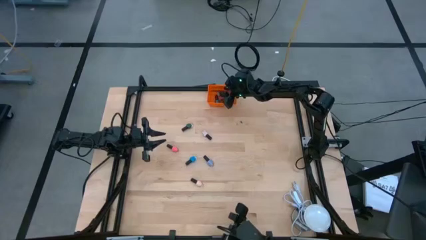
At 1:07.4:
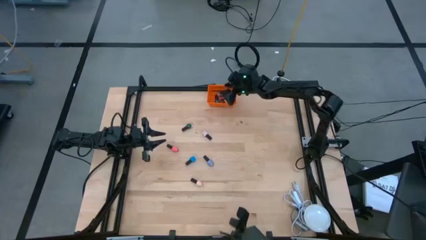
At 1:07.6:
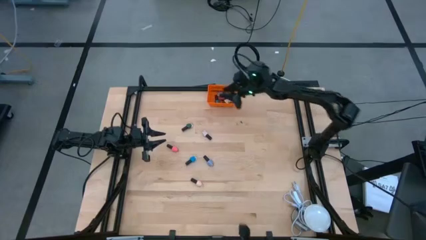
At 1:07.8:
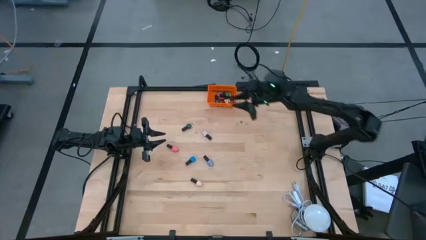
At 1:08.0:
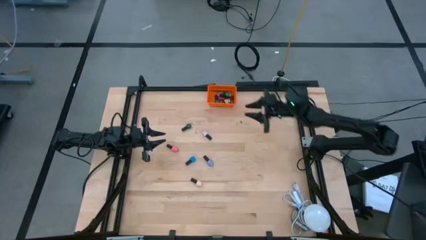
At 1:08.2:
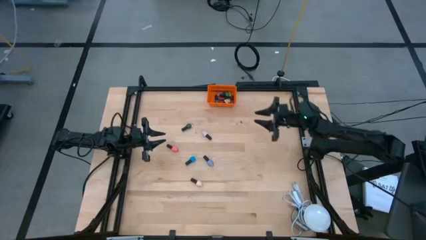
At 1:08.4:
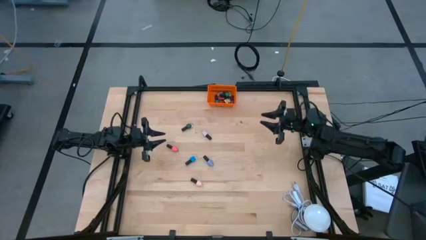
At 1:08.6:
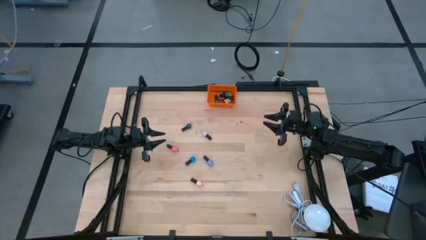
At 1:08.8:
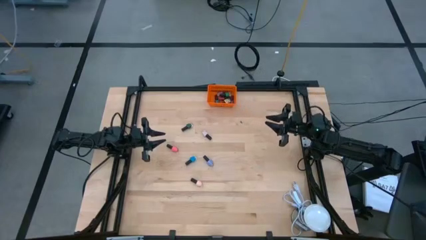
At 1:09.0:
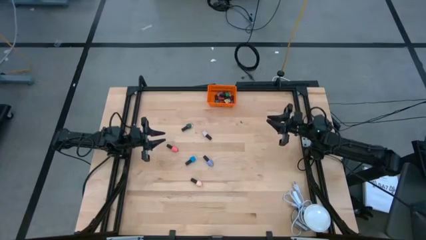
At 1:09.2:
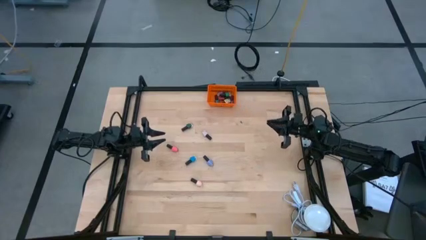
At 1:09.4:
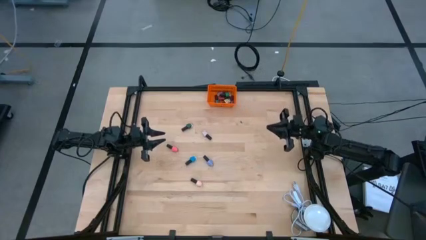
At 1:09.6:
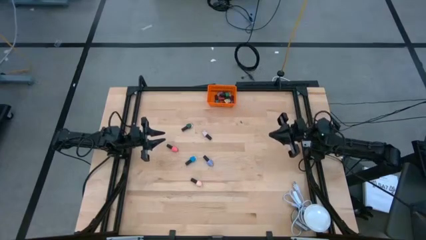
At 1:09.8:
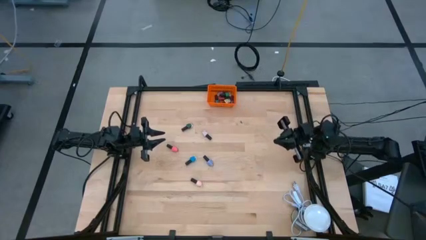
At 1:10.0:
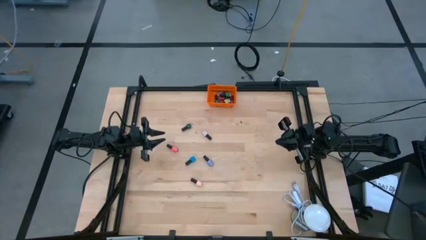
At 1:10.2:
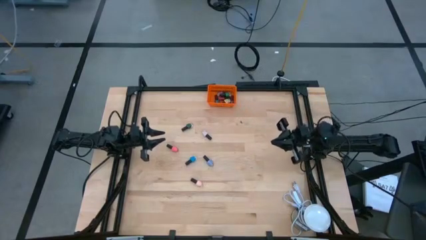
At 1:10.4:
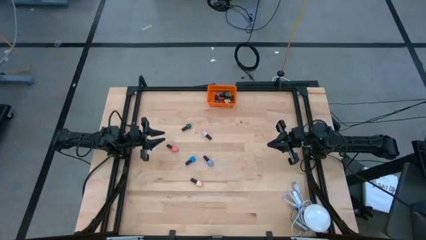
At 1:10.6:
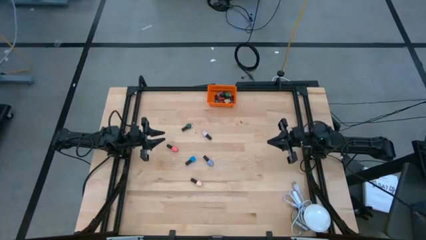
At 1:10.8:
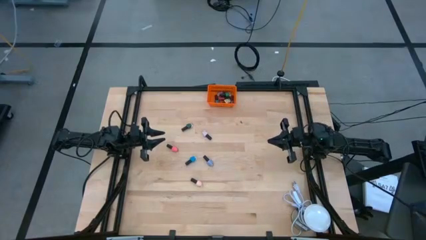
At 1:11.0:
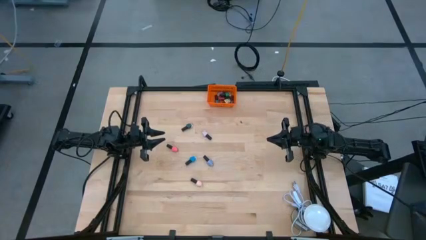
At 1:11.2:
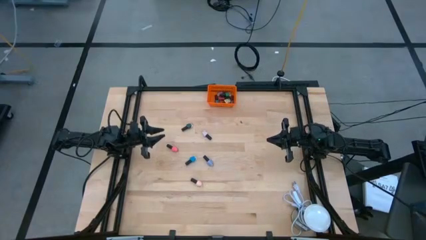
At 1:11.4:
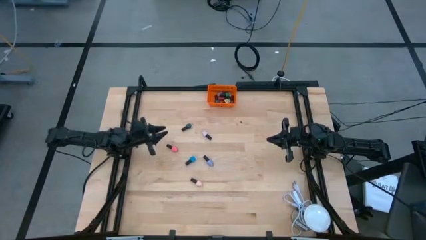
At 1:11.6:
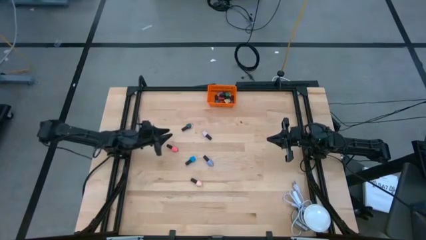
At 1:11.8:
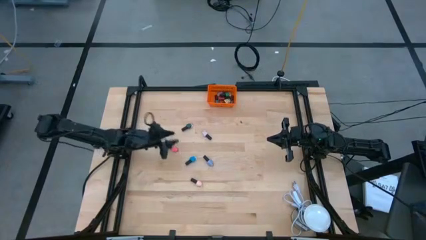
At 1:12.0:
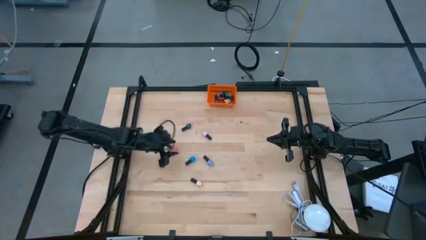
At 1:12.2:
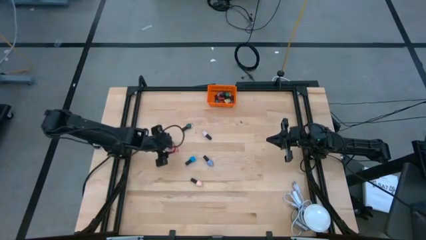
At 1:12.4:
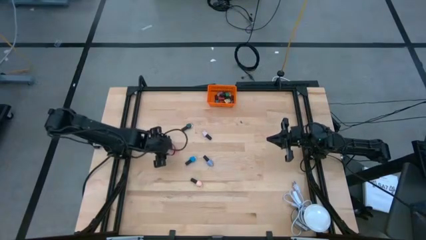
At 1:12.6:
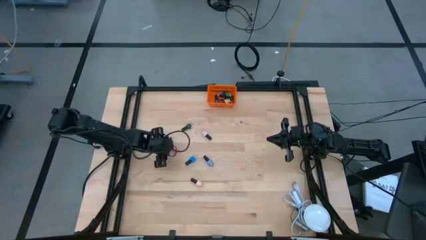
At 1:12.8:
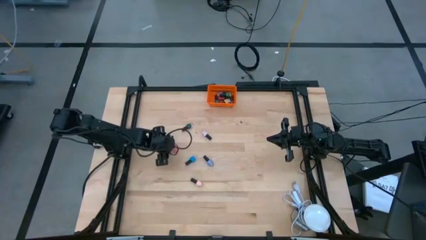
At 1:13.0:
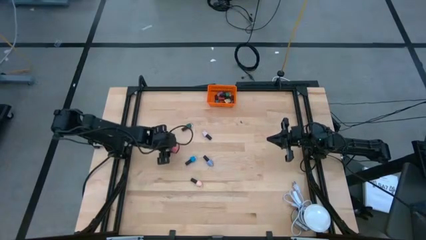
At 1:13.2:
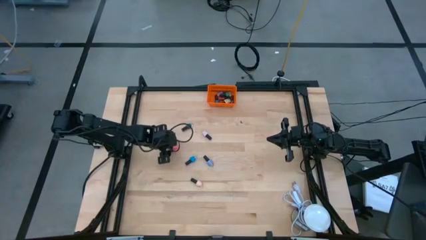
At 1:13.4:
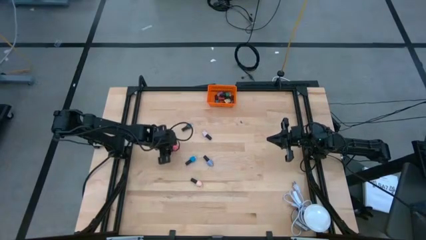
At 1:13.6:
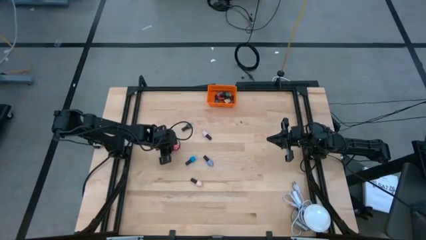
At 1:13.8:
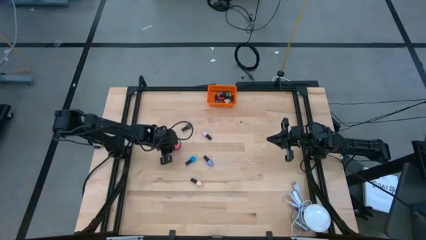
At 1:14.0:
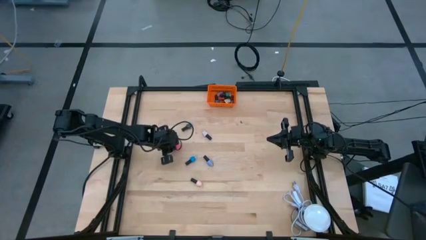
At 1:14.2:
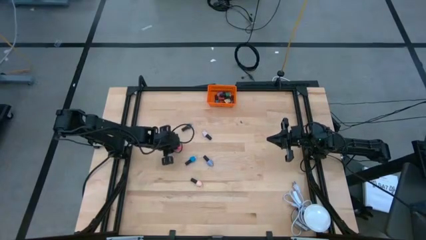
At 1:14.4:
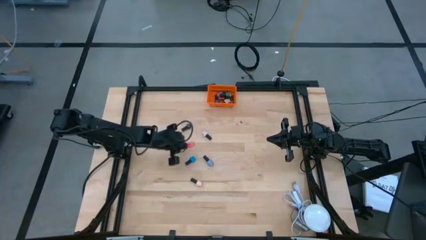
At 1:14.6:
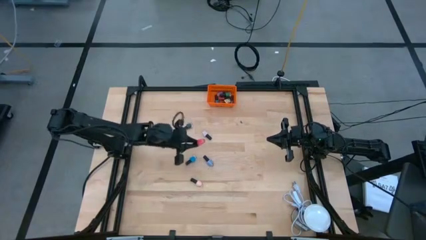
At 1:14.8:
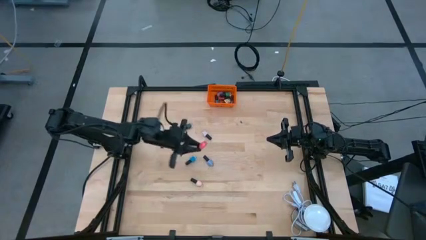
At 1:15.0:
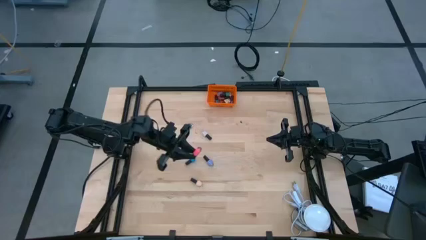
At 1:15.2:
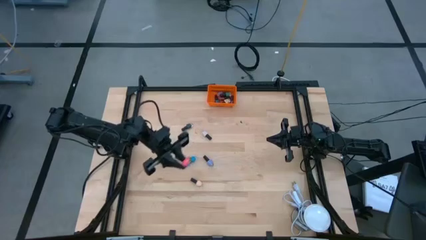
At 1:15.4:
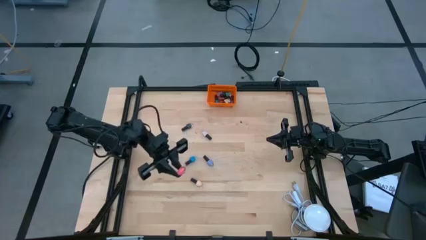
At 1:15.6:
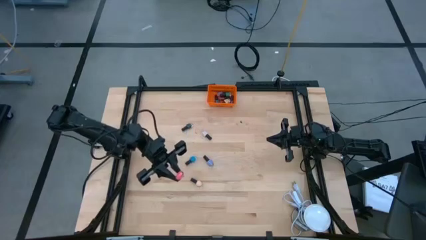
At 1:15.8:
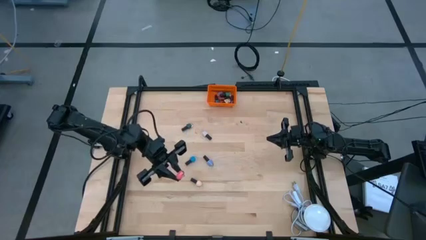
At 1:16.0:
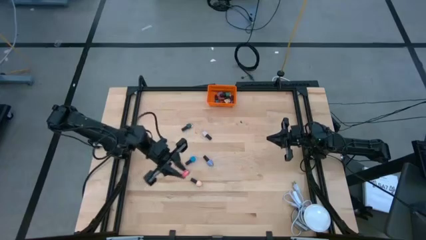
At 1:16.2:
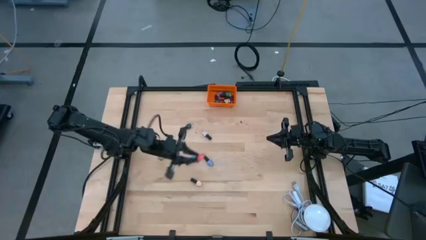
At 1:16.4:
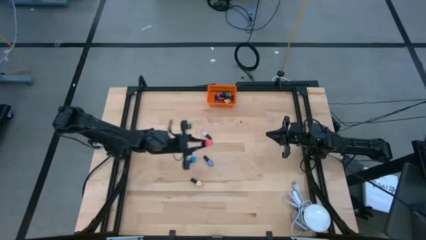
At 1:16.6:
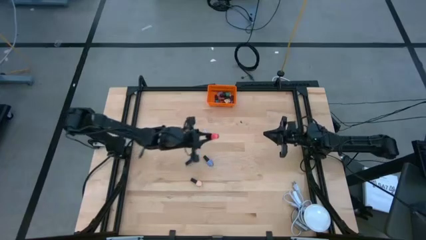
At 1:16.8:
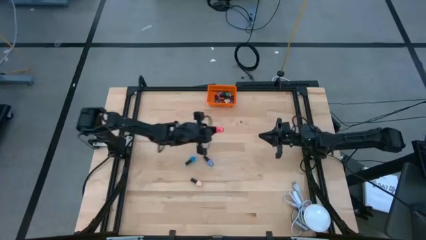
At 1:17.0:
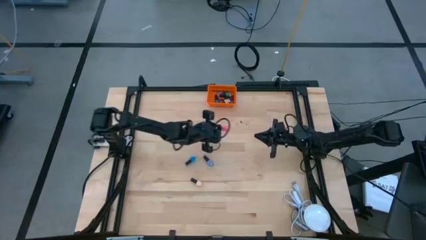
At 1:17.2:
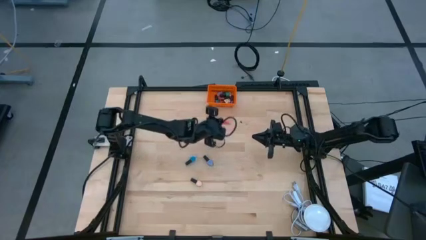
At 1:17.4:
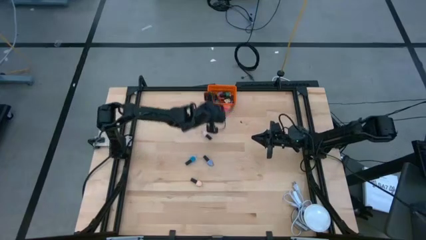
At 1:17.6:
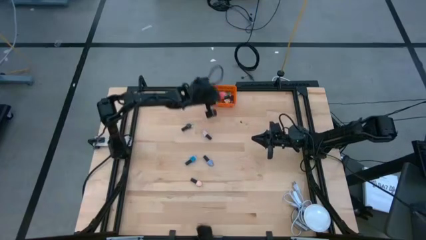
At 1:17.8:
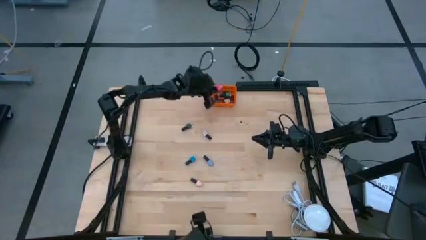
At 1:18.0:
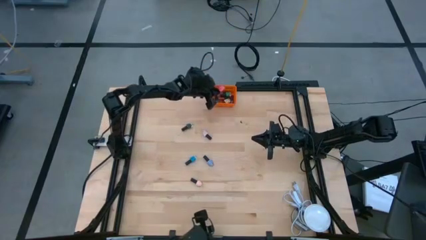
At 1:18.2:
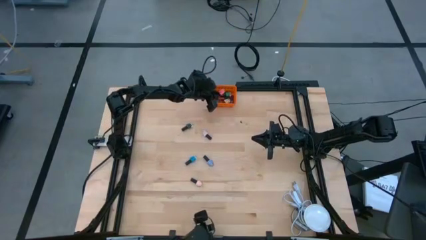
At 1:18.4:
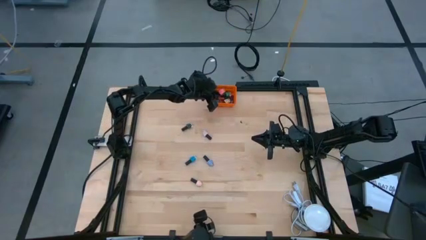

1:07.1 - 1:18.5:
Task: Pick & Place Nail Polish
Put the pink nail polish bottle into the basket

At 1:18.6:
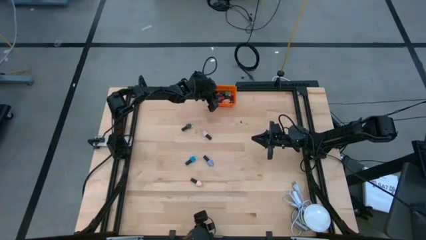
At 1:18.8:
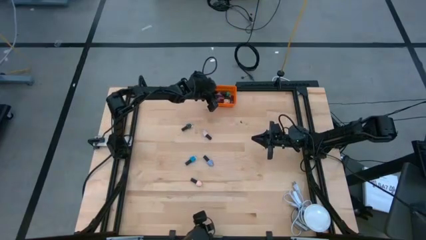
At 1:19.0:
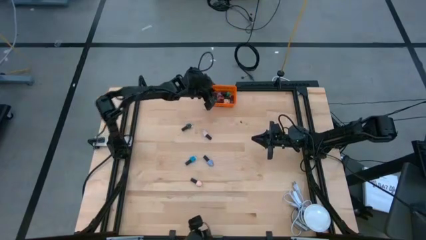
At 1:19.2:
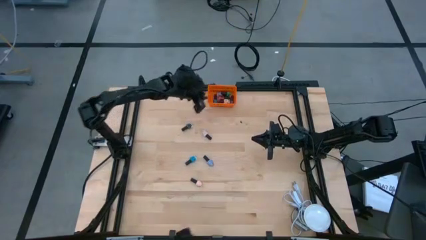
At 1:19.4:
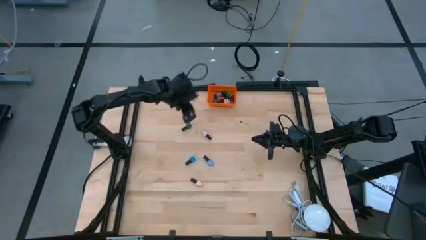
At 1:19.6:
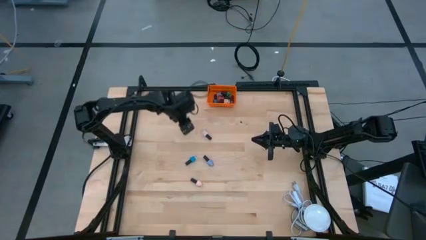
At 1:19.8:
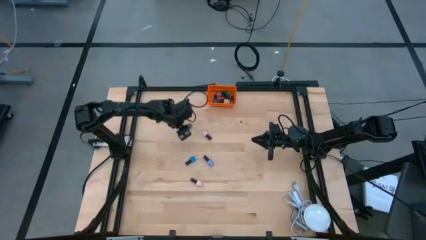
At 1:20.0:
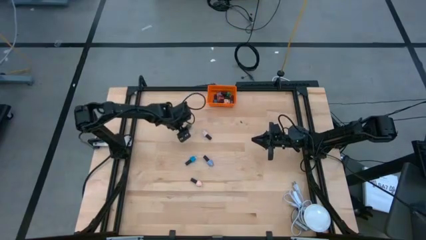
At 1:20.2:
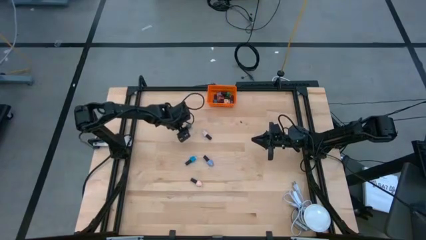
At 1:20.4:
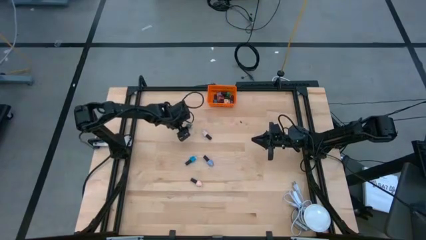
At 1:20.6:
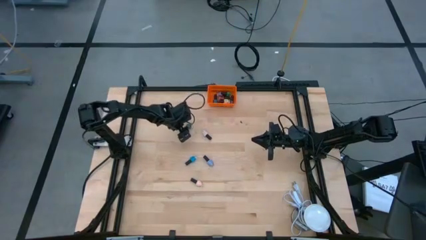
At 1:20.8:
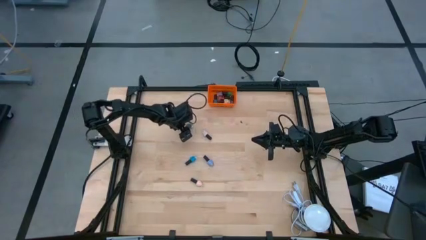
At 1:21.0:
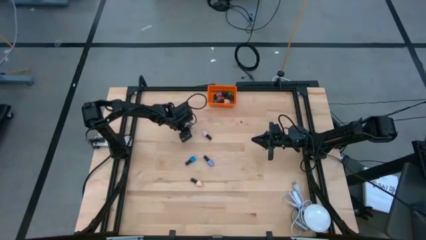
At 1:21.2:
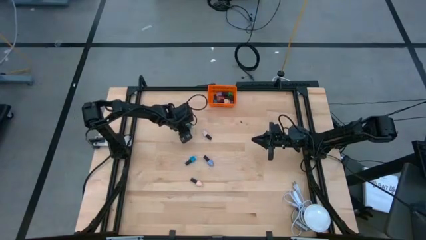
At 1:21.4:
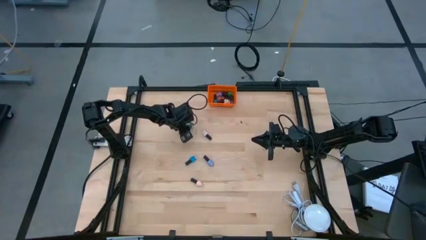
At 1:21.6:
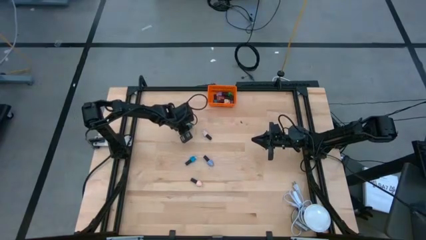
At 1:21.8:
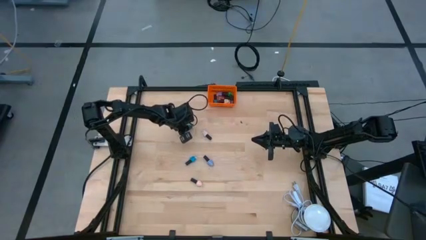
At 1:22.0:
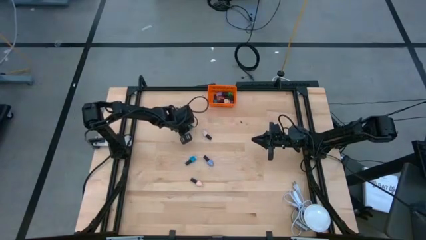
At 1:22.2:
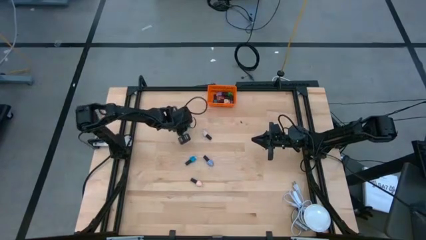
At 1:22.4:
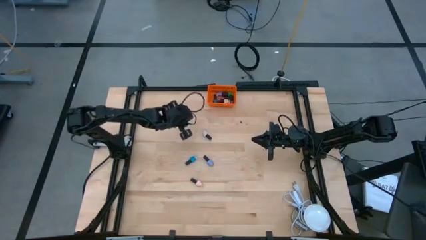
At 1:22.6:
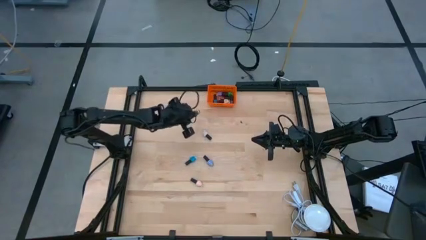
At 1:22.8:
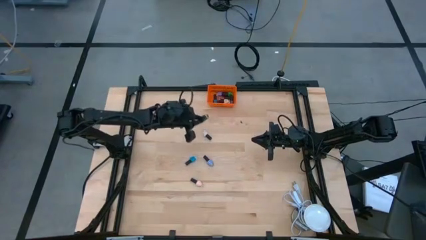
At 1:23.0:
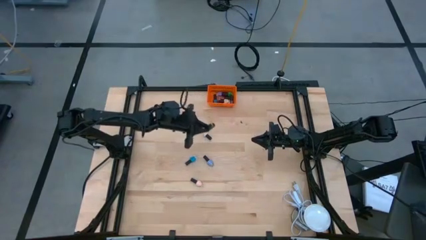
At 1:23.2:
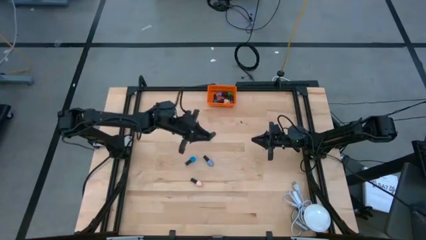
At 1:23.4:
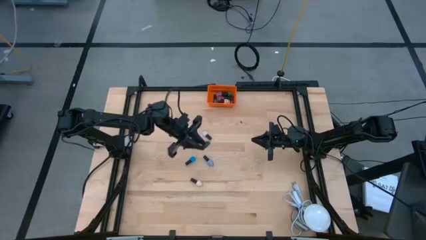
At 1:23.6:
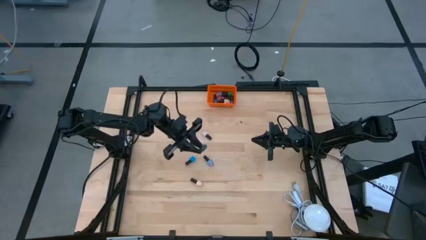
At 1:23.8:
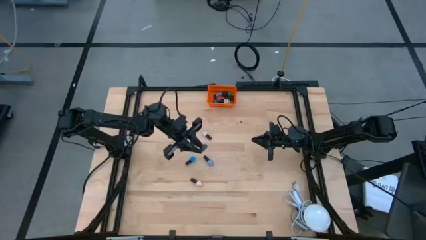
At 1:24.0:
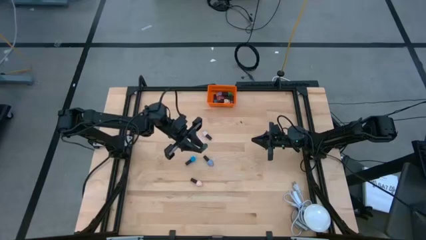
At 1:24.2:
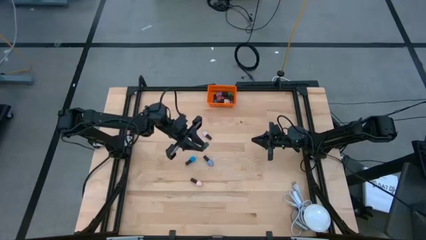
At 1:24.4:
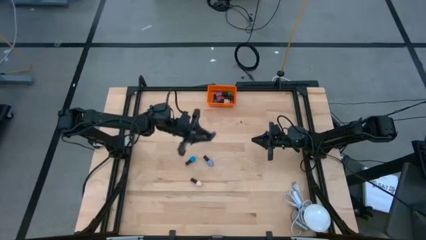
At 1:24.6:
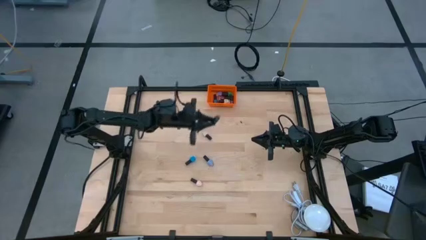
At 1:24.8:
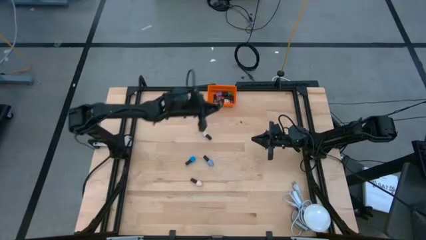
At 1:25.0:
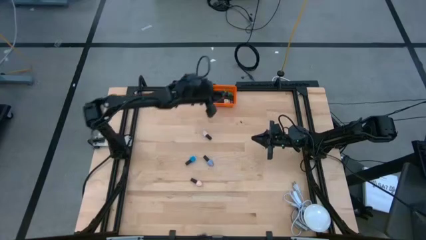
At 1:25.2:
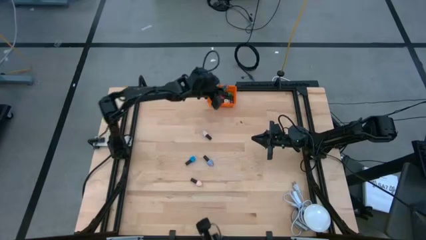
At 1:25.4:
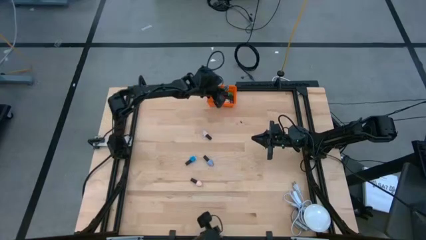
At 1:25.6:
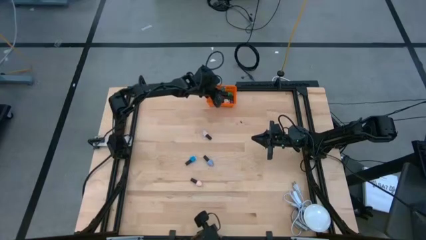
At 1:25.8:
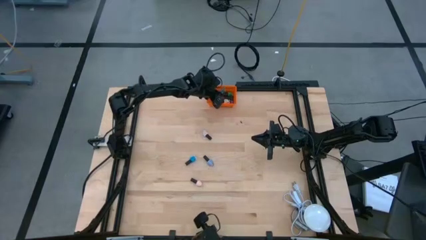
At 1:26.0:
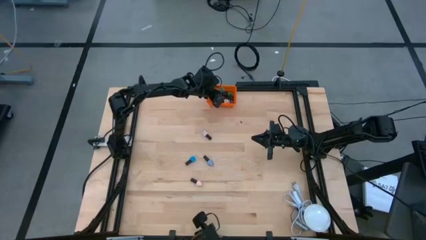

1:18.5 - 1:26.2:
Put the dark green nail polish bottle into the basket
